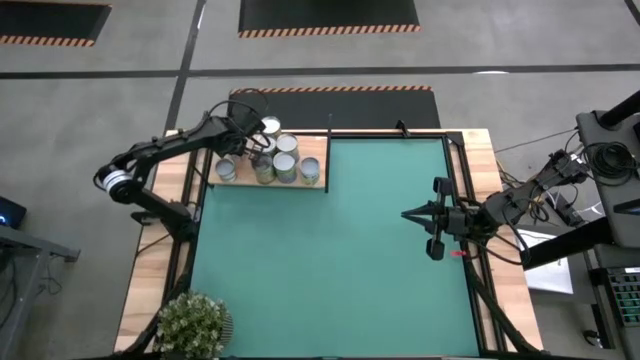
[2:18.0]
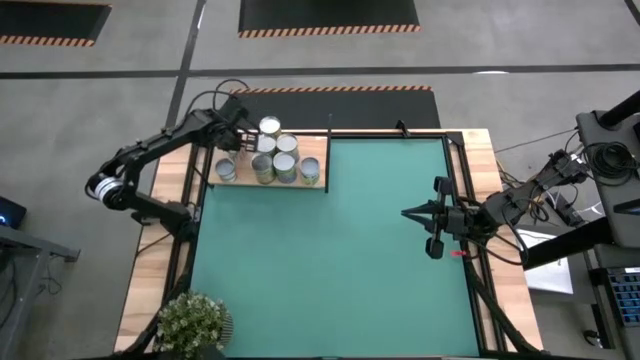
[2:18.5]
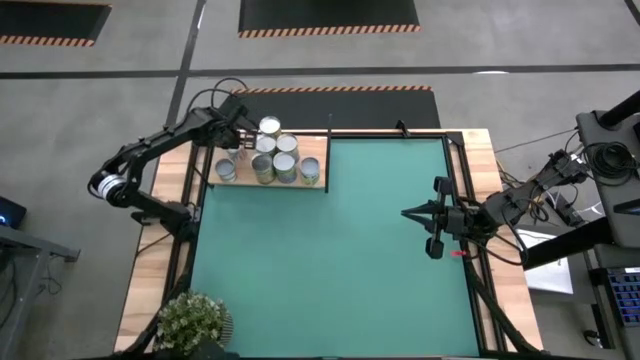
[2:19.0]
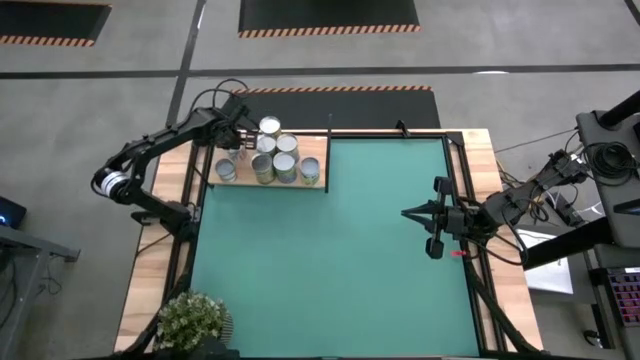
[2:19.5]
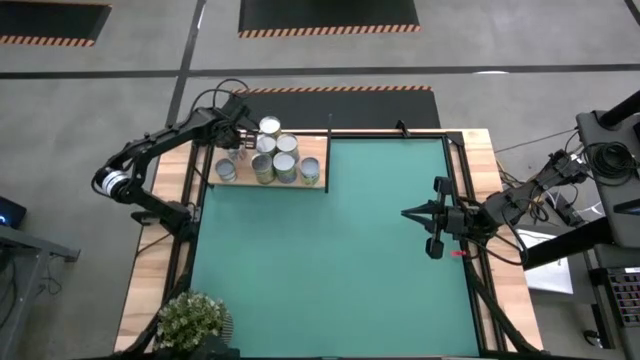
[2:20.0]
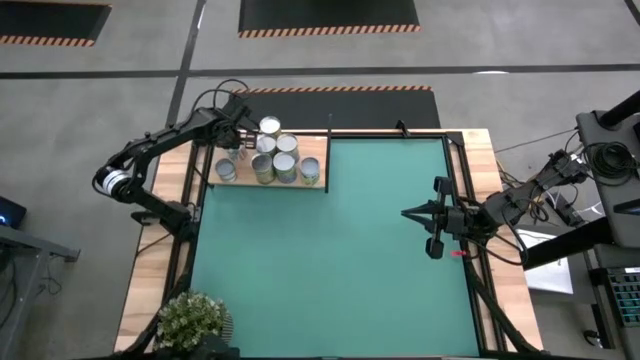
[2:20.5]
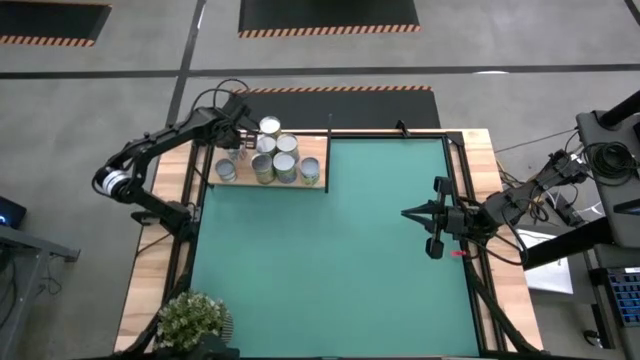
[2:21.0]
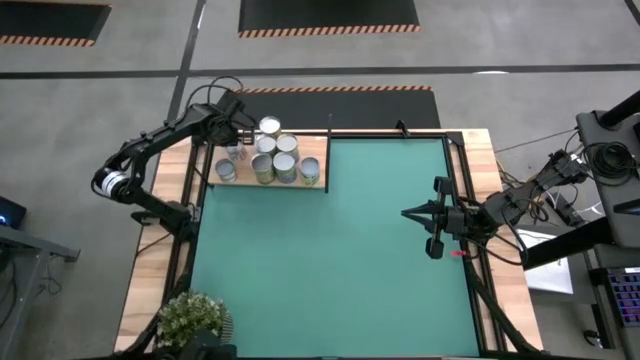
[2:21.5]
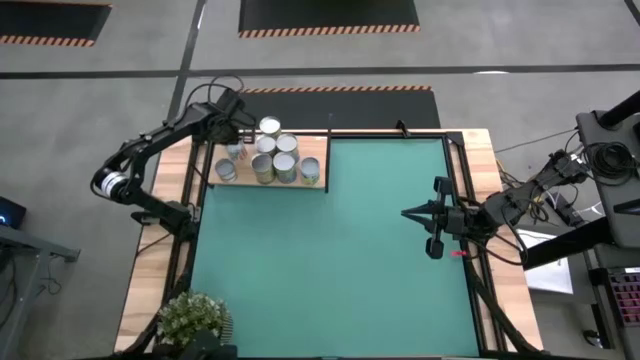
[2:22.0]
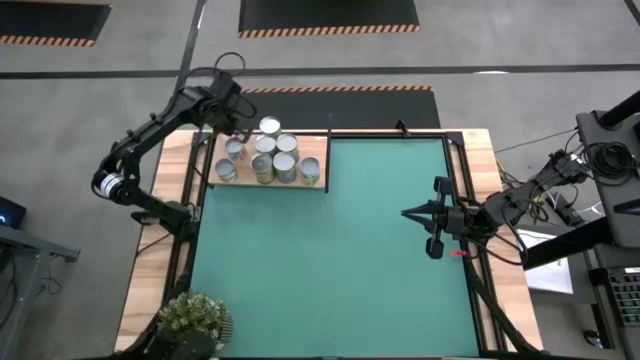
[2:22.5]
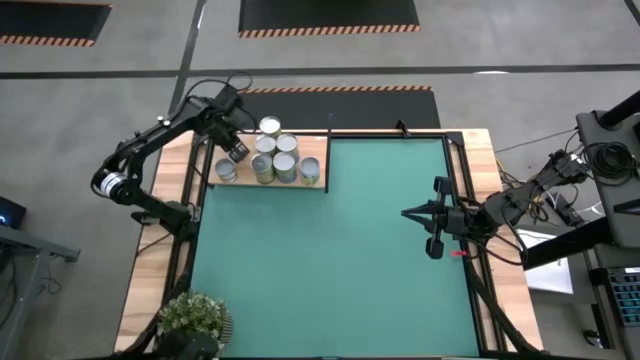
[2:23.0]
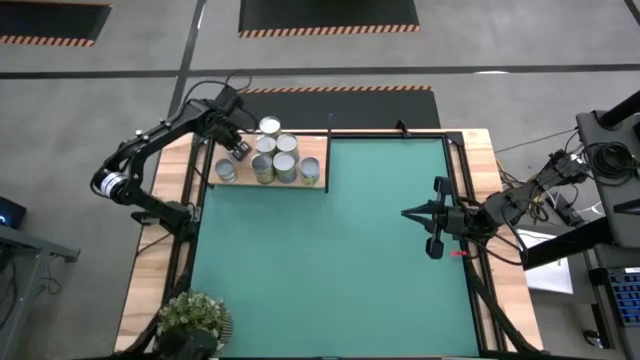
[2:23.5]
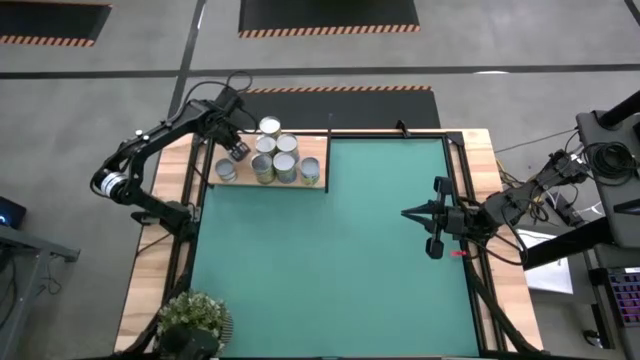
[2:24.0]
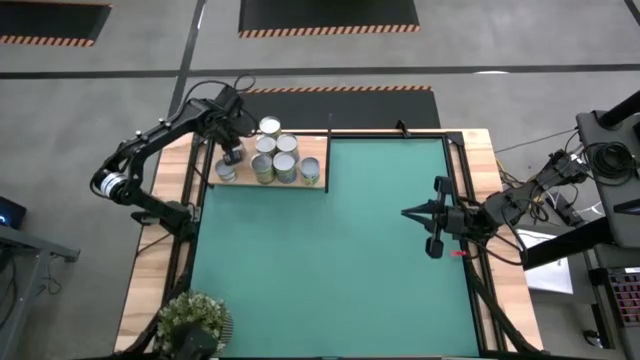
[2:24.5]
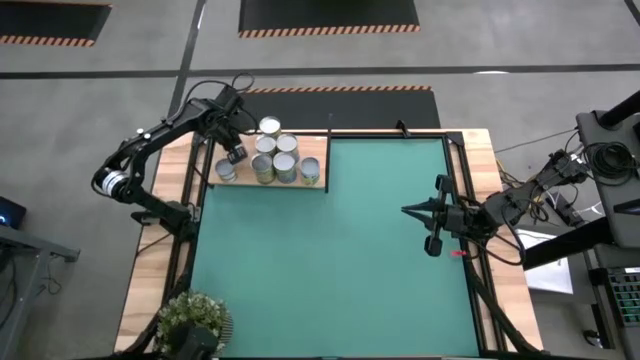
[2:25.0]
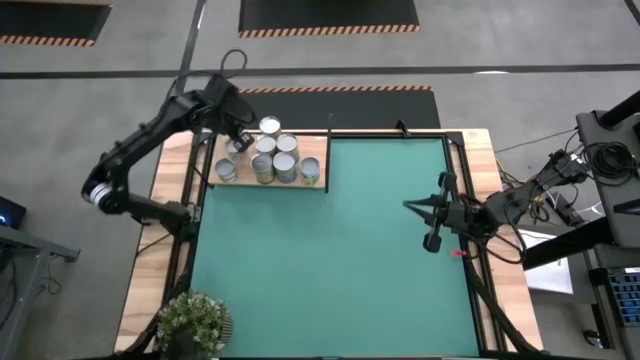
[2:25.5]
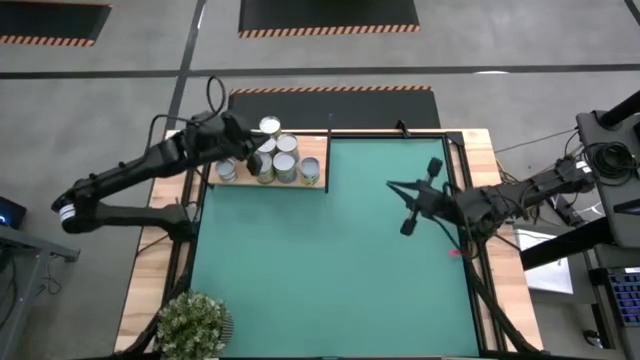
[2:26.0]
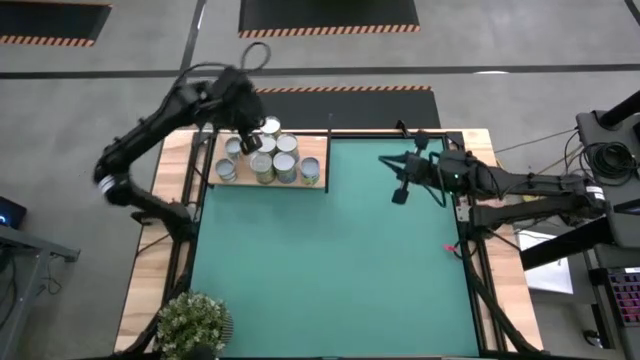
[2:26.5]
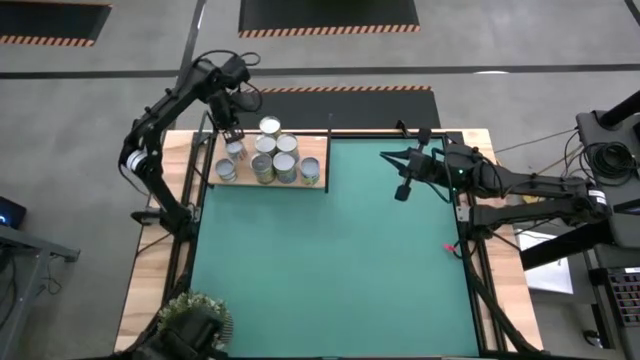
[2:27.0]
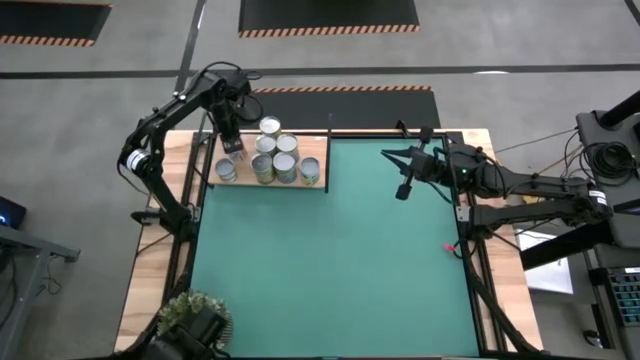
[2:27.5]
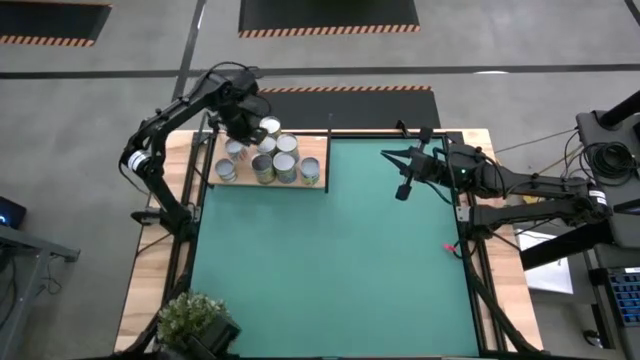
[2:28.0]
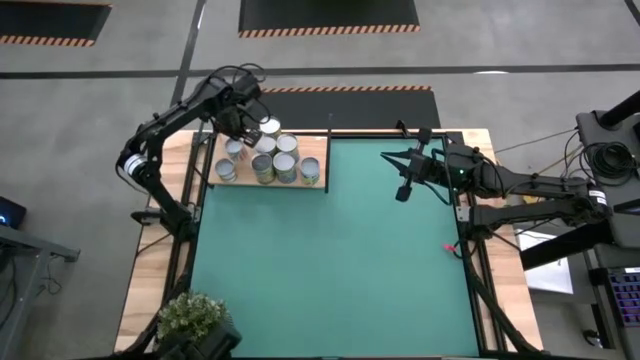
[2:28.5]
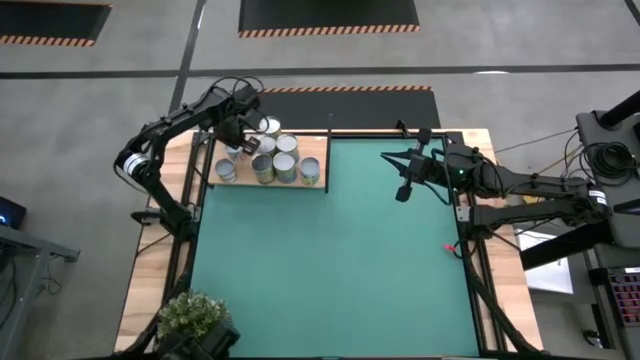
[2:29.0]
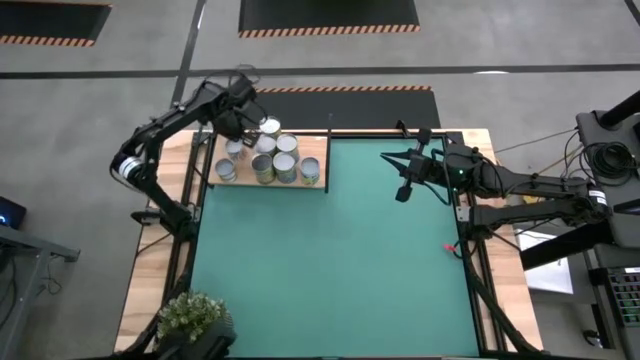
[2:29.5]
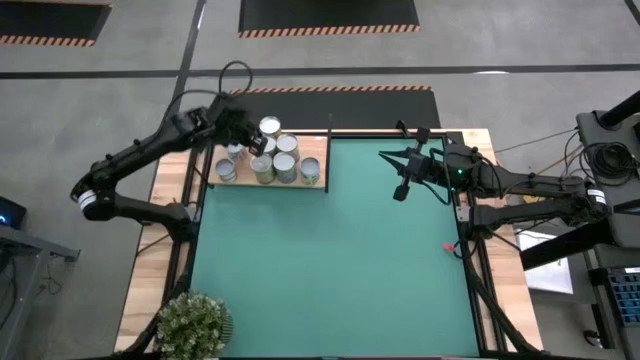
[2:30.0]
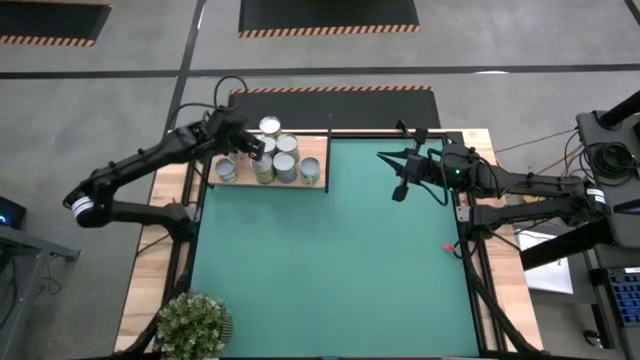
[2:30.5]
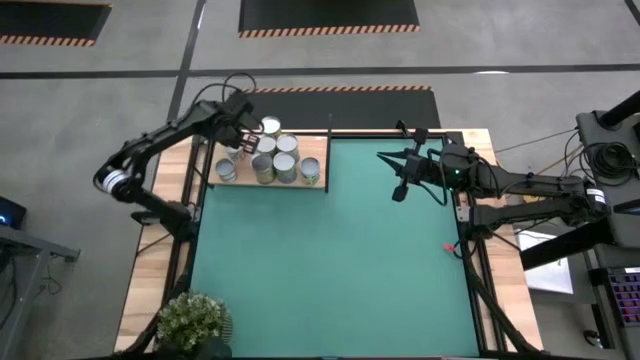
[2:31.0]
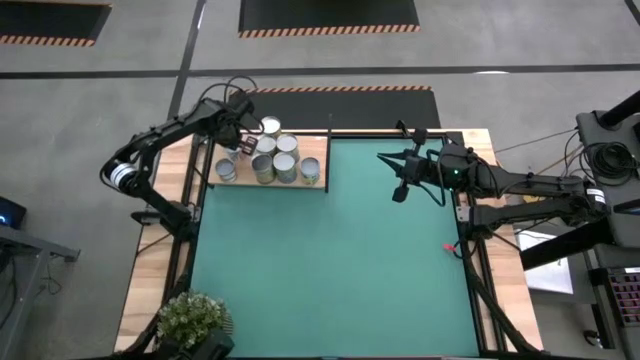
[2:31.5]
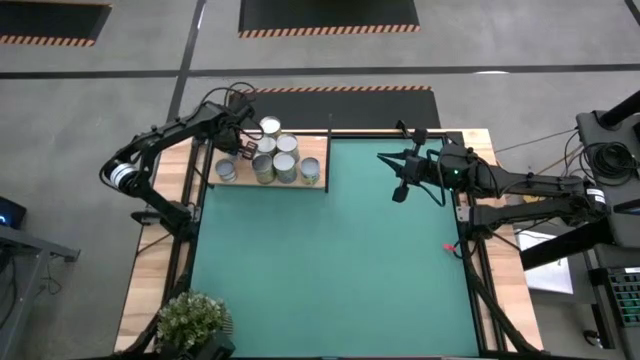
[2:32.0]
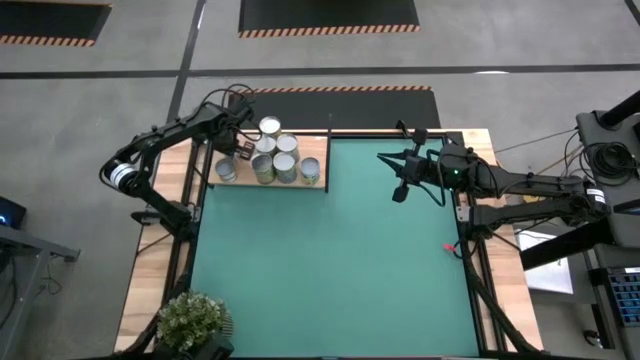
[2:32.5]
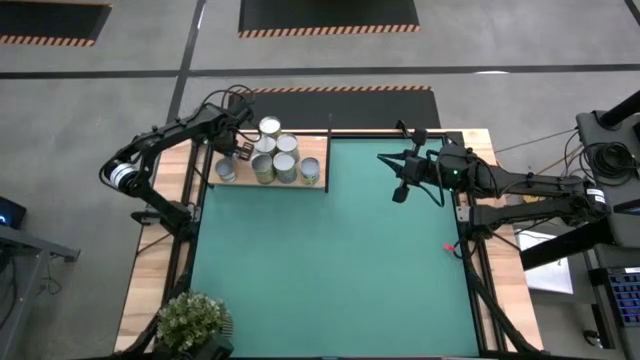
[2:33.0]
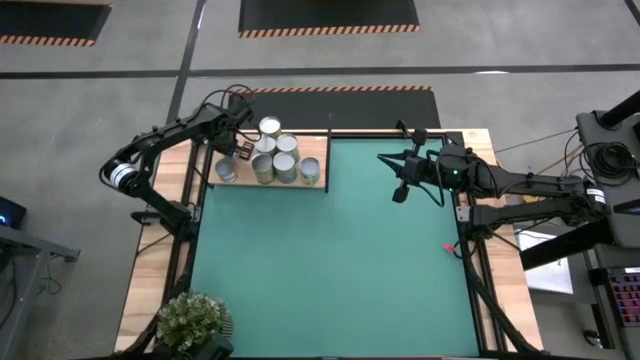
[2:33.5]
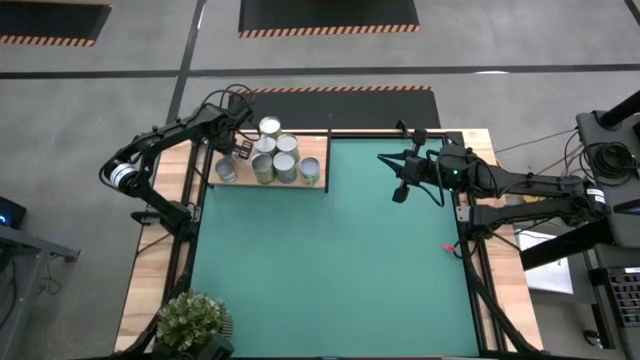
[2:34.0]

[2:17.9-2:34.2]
Task: Pick and place cans onto a shelf
Put the canned carrots on the shelf

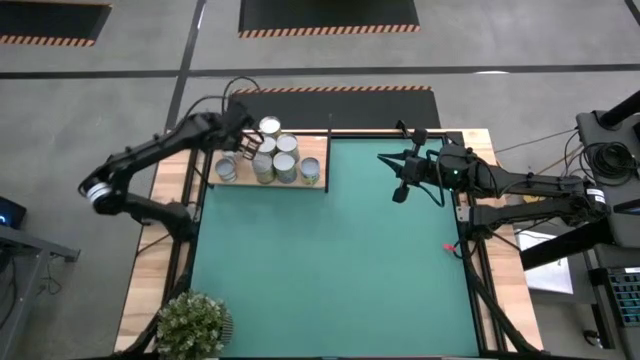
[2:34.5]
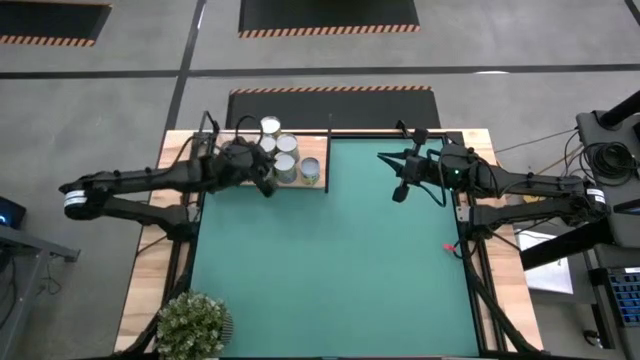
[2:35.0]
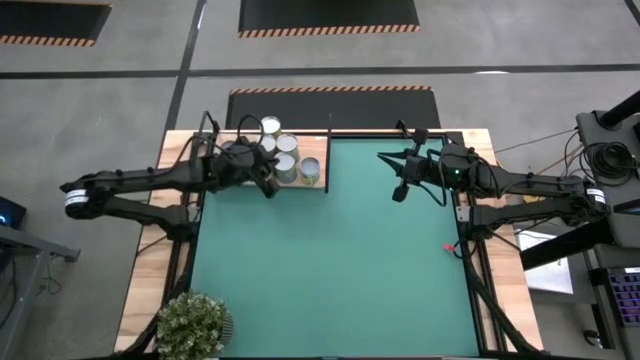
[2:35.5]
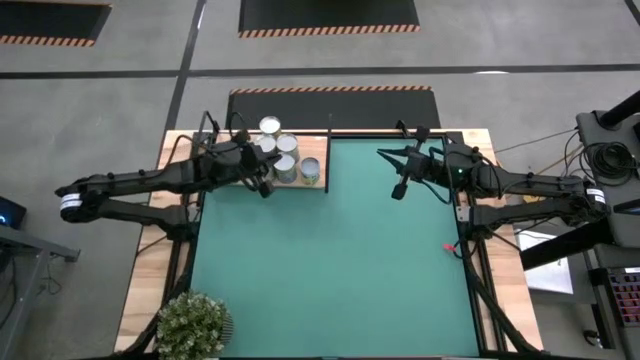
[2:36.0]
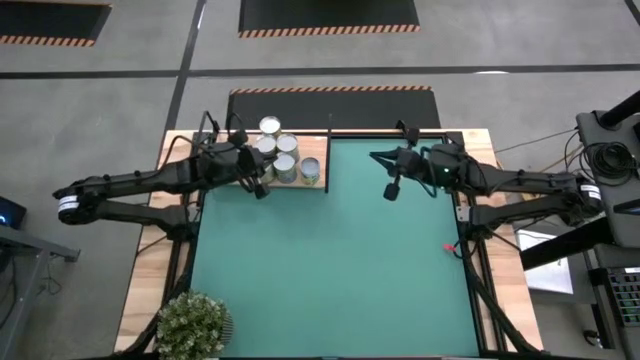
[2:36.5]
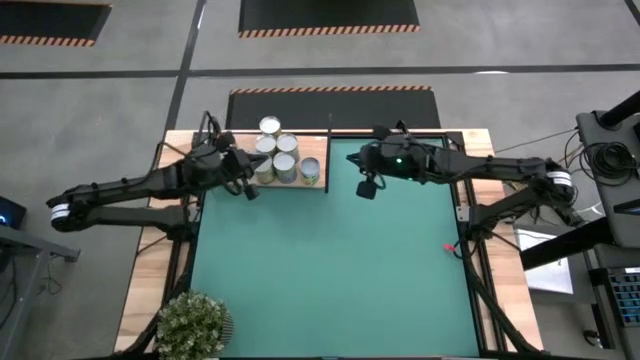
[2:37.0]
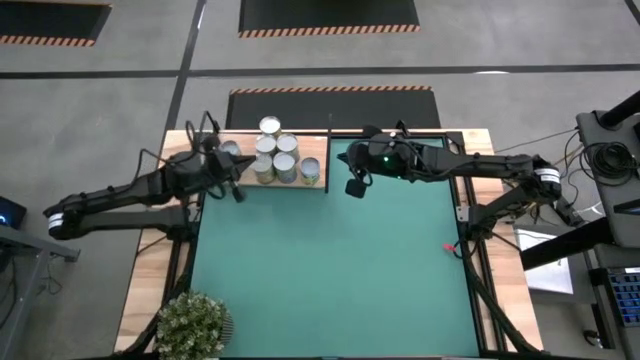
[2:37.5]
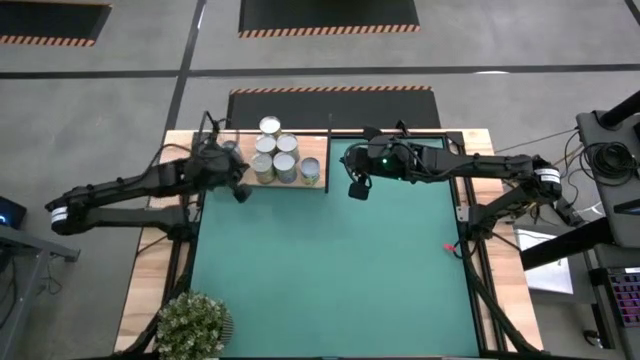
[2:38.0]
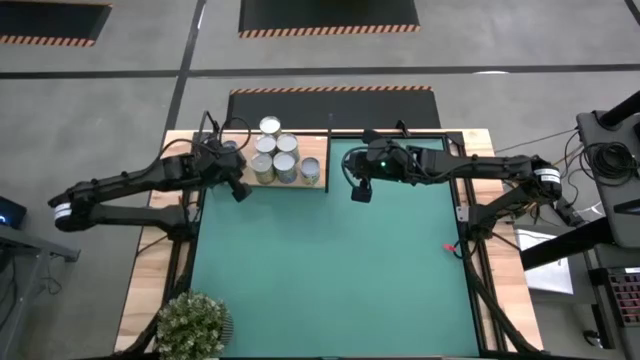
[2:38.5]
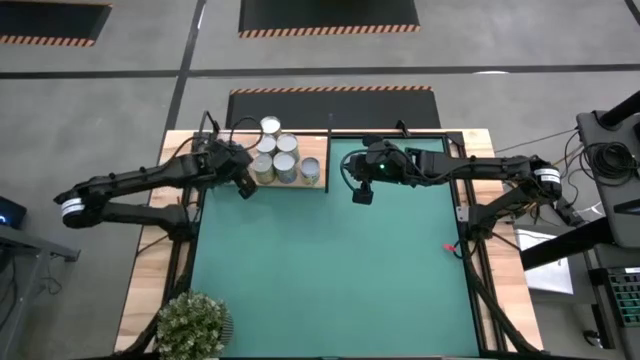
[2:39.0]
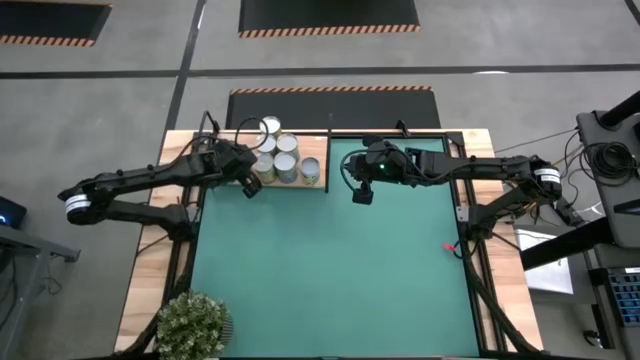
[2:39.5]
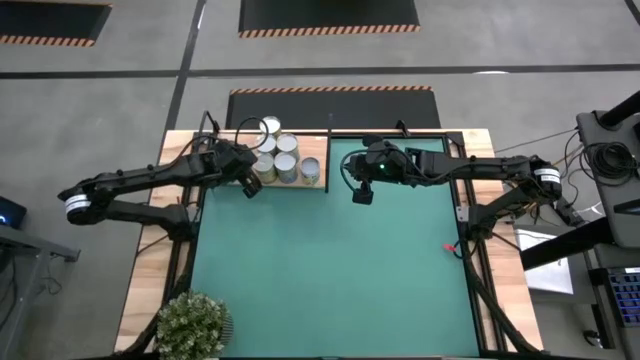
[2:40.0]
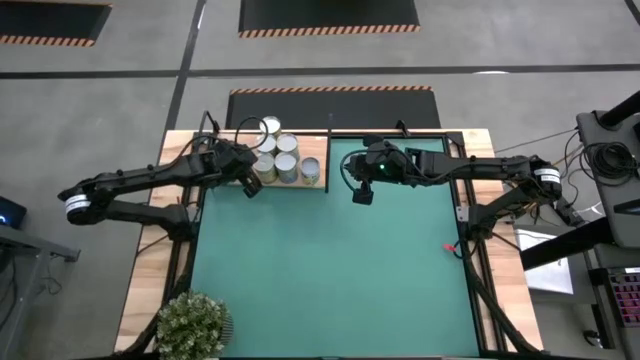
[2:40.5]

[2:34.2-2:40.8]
Adjust the large canned oranges on the shelf
